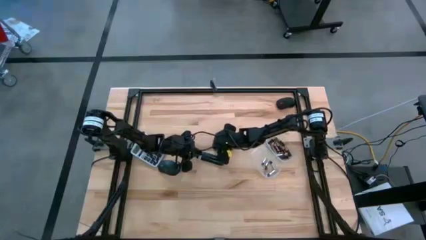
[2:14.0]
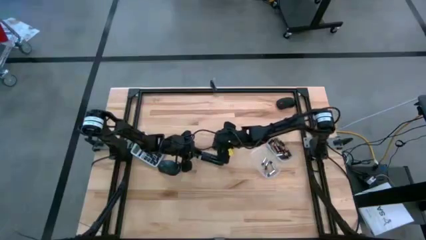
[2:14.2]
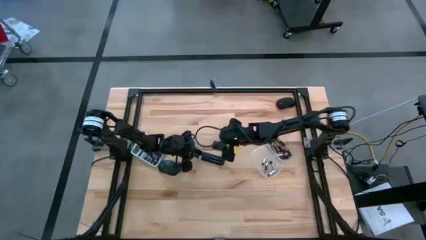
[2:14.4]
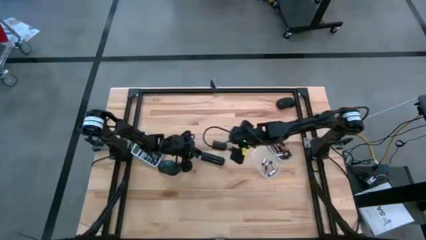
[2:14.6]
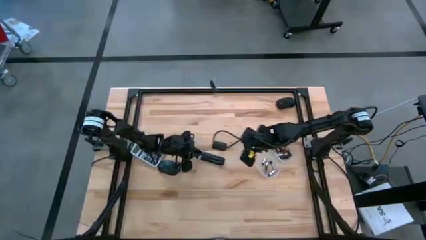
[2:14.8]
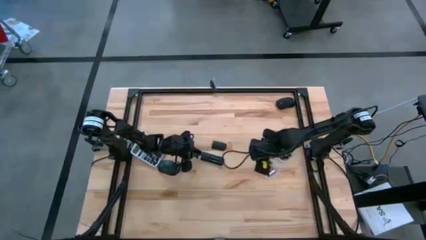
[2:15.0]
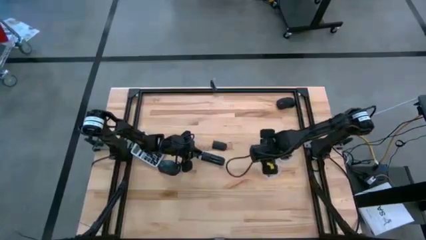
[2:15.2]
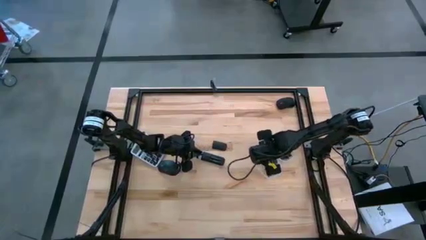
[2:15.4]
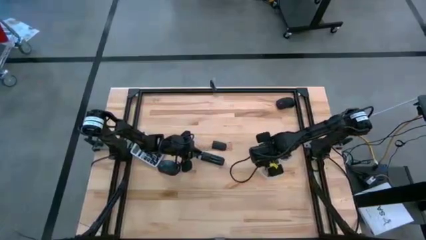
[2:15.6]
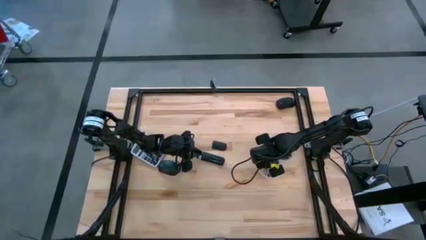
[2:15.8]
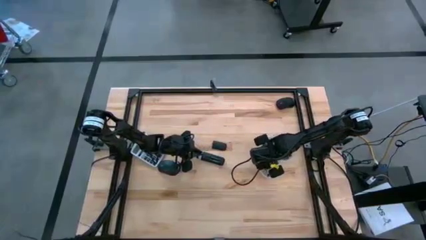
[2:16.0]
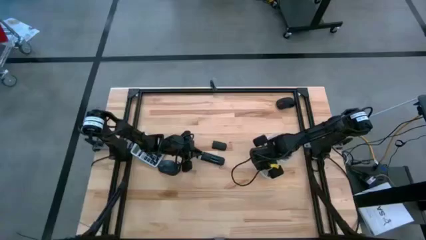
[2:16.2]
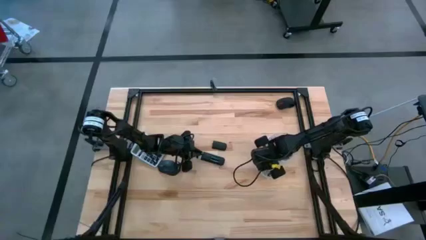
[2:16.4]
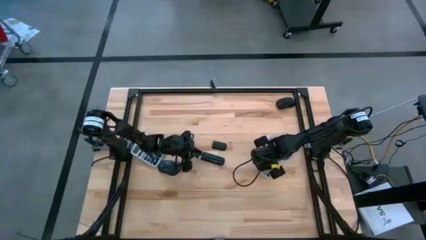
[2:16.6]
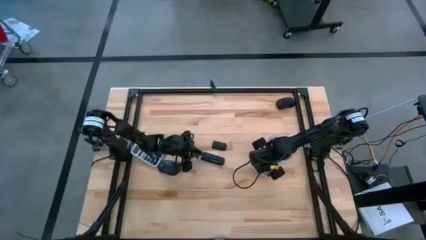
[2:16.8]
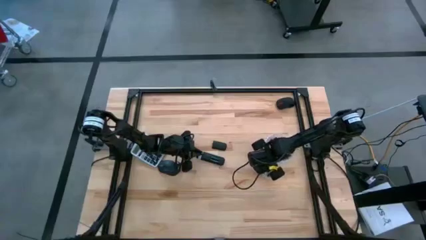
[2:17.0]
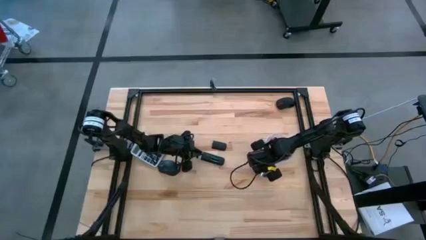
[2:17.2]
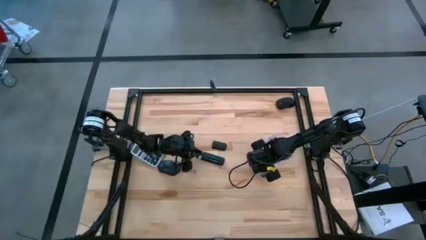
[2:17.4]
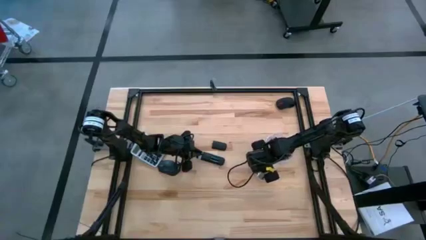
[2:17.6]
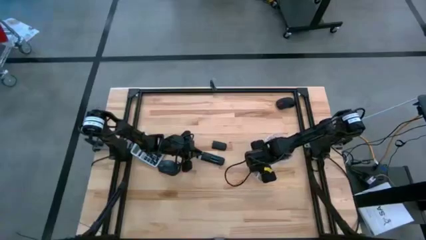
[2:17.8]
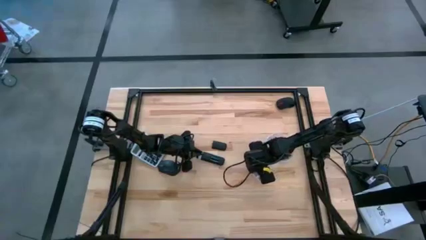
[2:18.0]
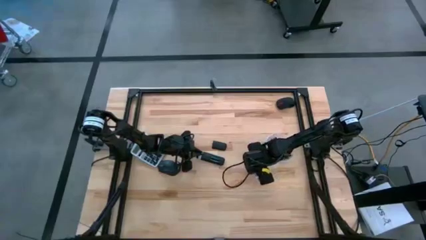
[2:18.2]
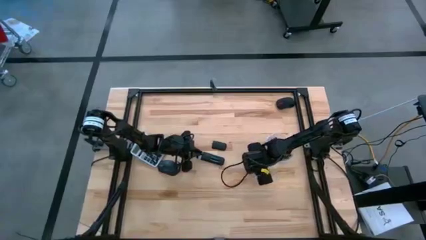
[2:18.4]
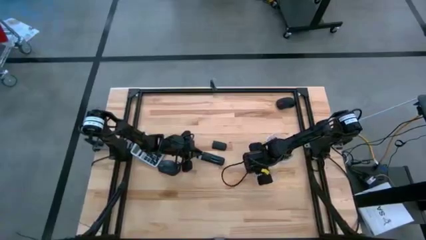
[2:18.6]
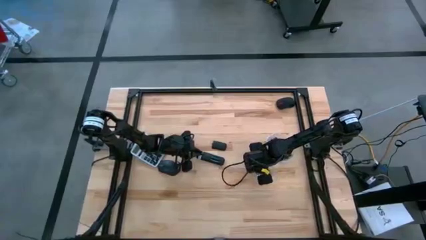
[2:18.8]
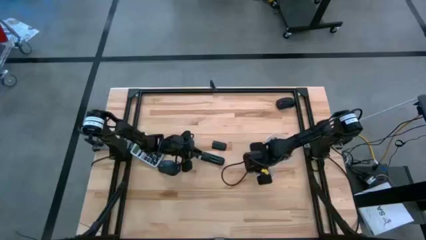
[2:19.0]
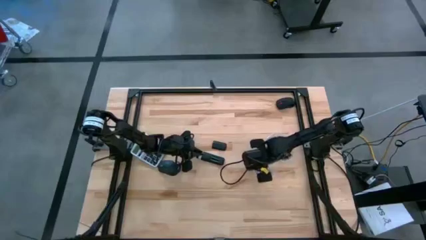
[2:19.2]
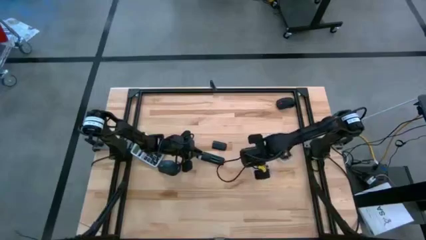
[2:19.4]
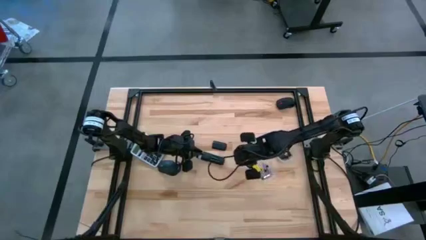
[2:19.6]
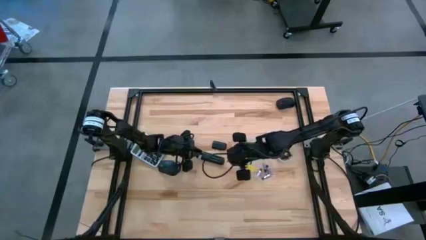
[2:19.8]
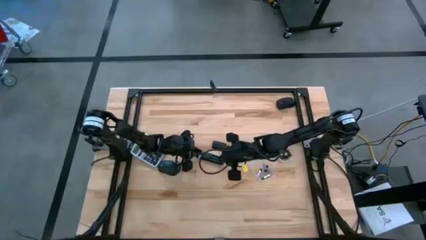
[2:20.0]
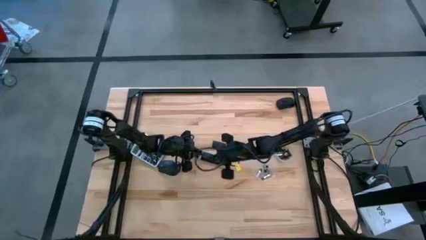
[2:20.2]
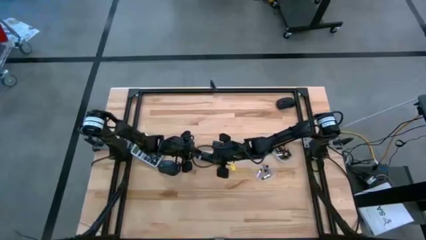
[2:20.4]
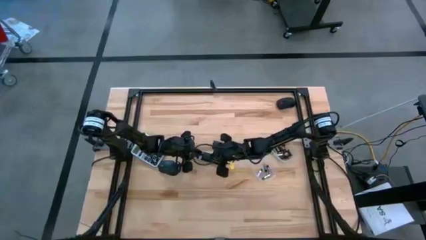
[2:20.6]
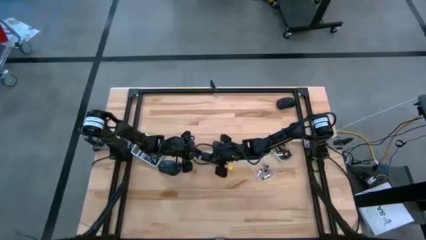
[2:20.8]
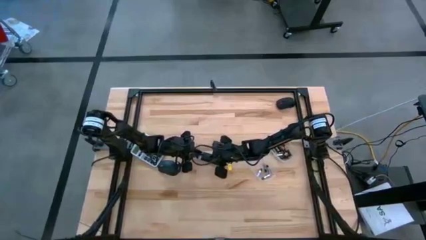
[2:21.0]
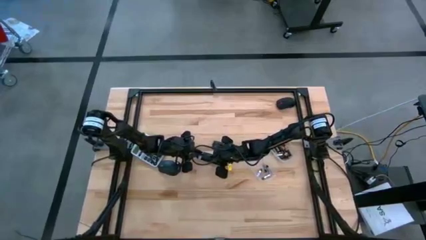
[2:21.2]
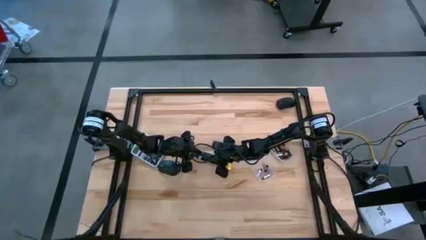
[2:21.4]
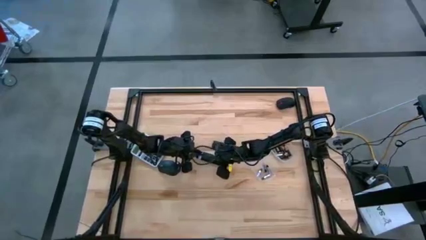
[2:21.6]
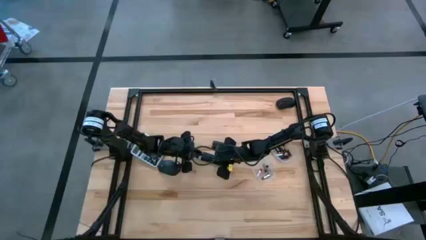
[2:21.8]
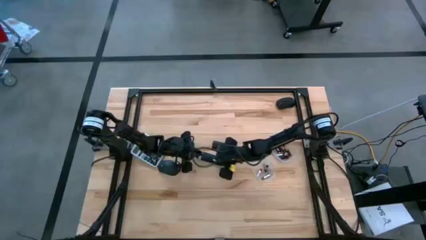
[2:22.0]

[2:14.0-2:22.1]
Task: Insert battery
Insert the silver battery into the remote battery compartment

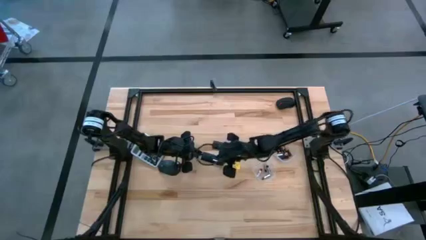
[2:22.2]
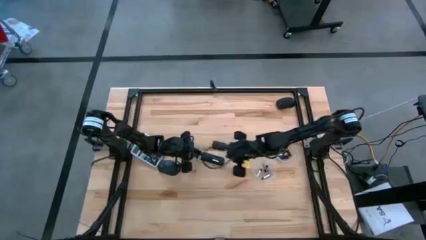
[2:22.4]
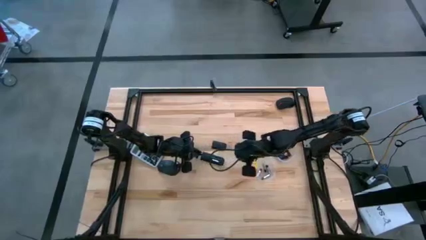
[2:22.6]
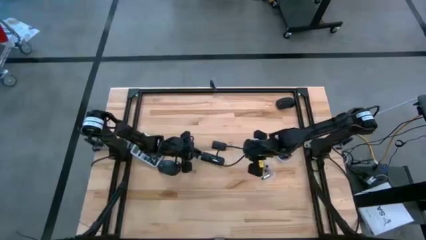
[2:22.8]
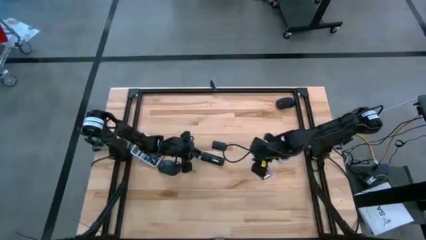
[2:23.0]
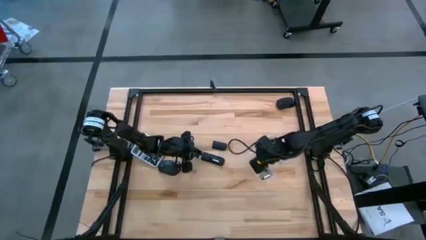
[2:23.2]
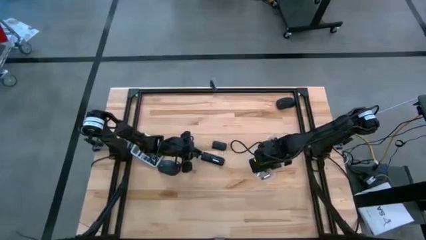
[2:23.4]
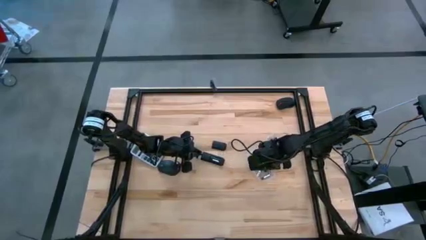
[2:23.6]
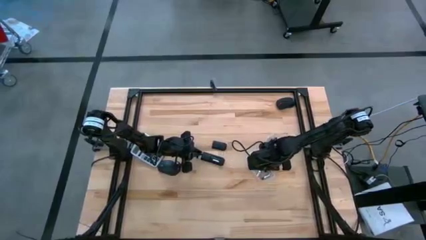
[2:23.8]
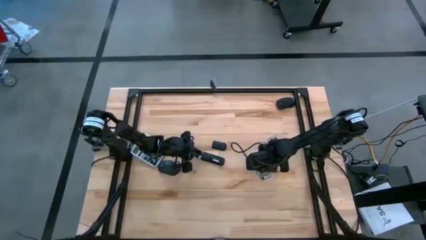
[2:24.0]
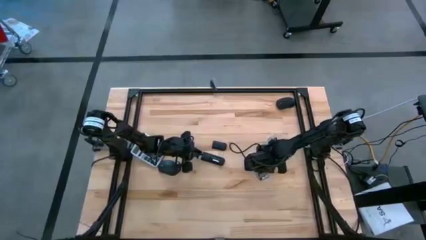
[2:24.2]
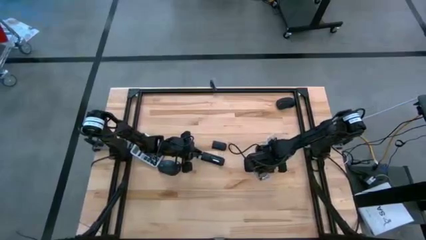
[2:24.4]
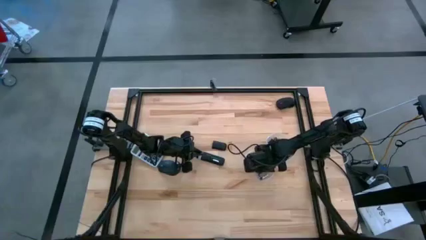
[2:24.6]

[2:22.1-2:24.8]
Insert the silver battery into the remote battery compartment

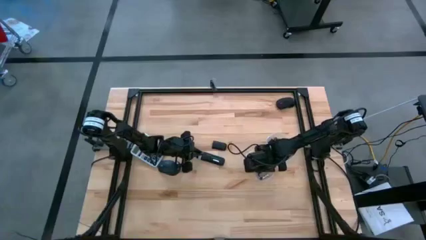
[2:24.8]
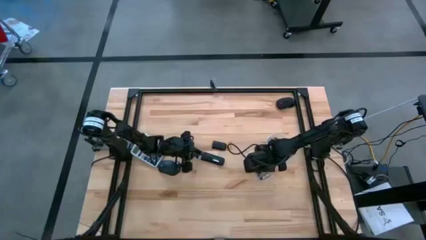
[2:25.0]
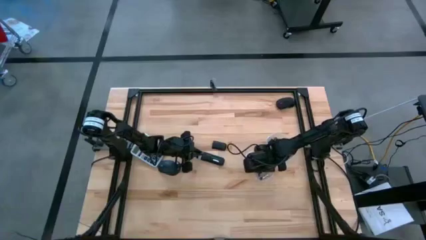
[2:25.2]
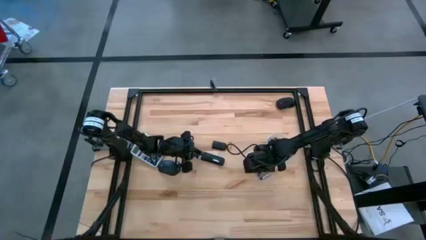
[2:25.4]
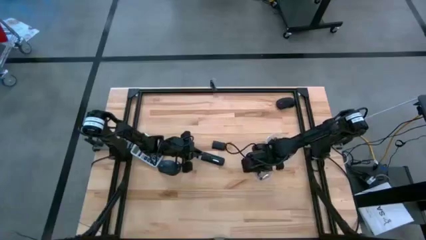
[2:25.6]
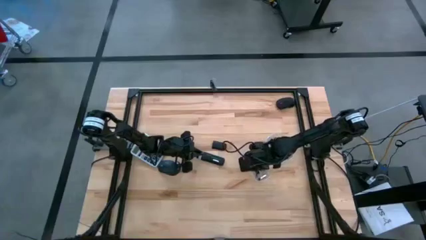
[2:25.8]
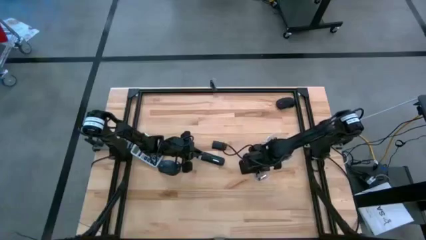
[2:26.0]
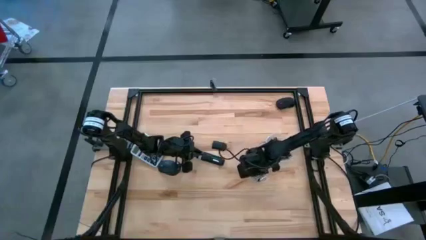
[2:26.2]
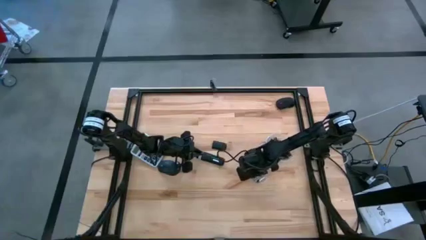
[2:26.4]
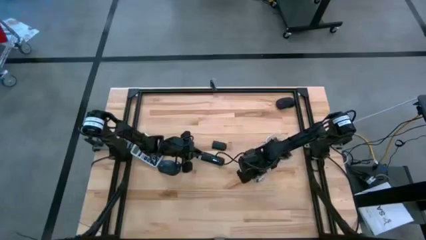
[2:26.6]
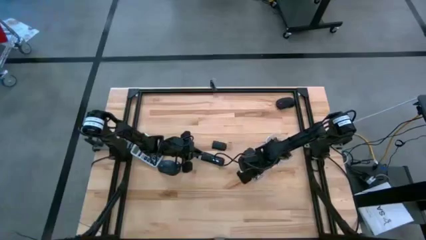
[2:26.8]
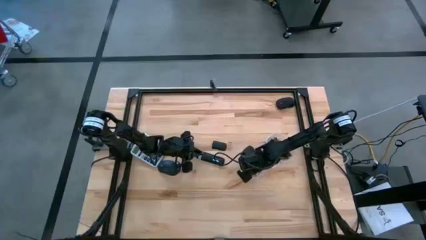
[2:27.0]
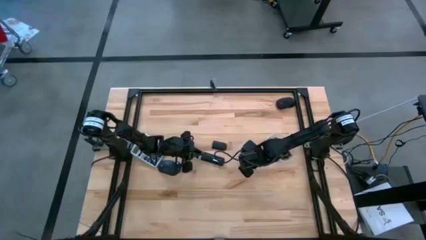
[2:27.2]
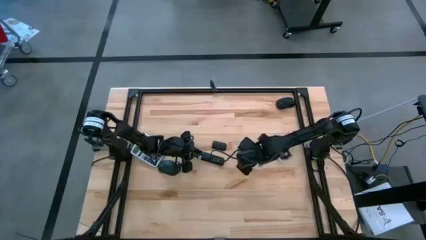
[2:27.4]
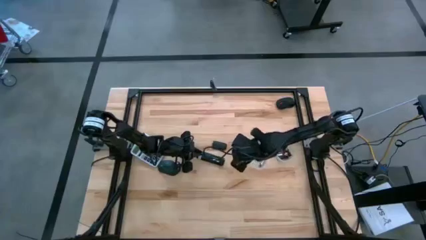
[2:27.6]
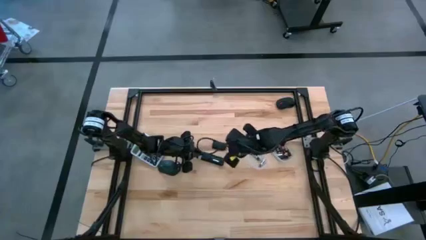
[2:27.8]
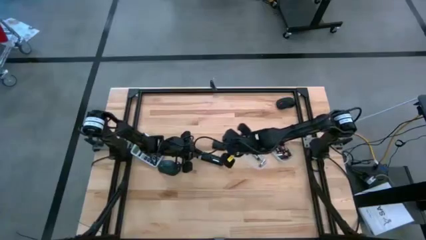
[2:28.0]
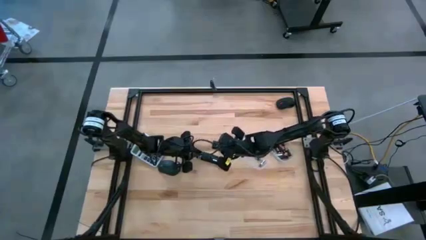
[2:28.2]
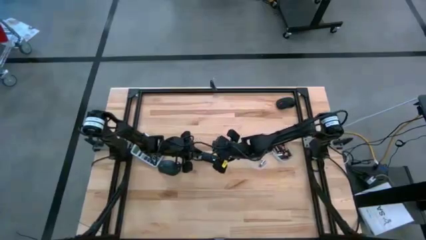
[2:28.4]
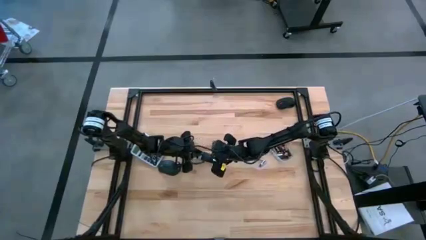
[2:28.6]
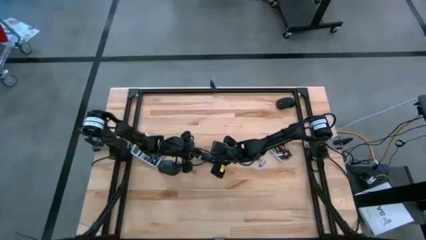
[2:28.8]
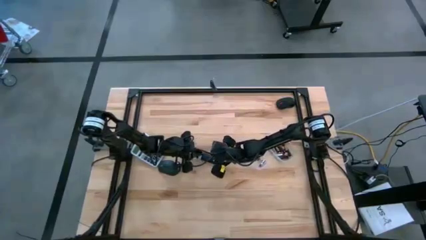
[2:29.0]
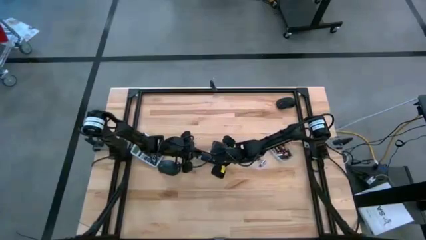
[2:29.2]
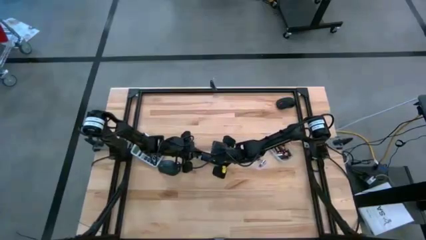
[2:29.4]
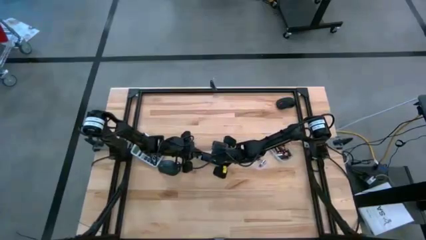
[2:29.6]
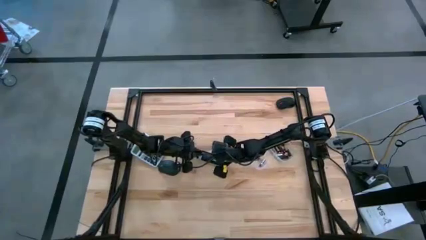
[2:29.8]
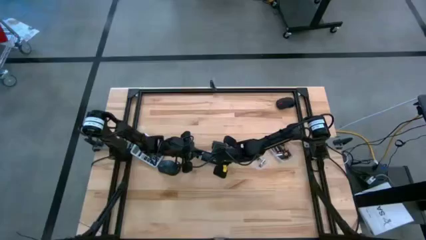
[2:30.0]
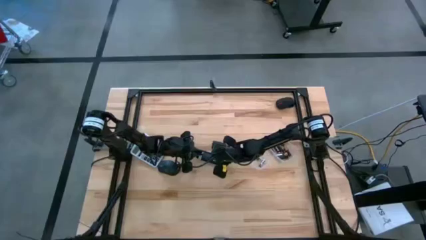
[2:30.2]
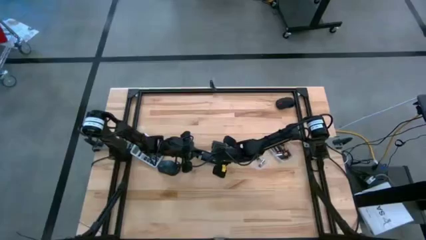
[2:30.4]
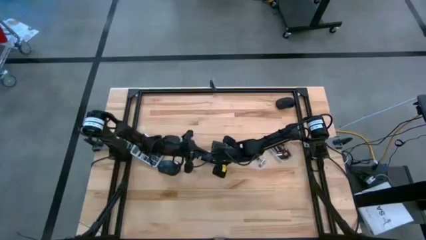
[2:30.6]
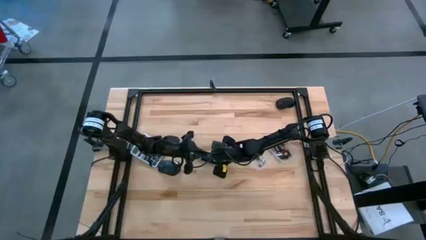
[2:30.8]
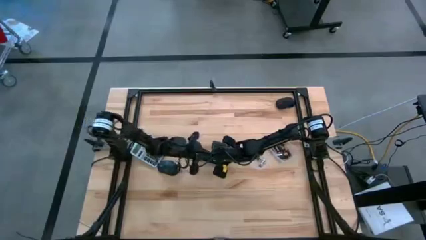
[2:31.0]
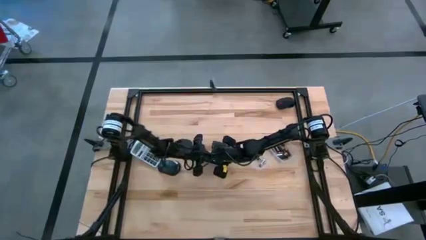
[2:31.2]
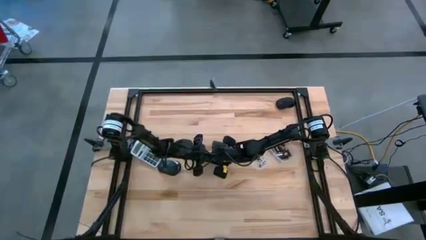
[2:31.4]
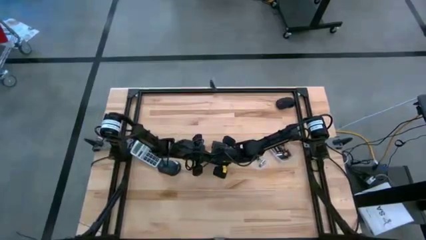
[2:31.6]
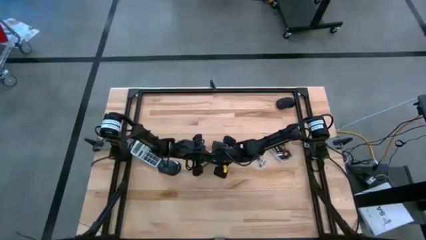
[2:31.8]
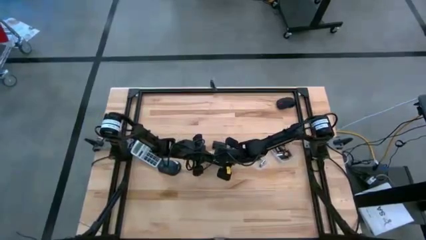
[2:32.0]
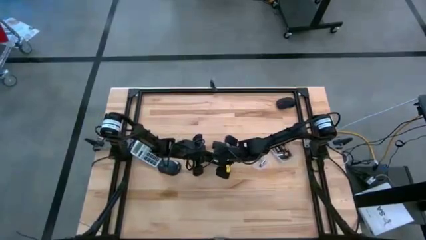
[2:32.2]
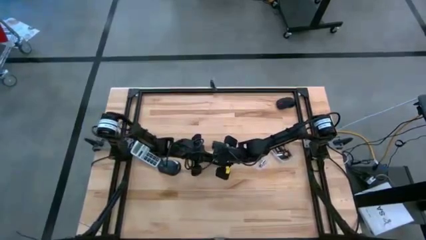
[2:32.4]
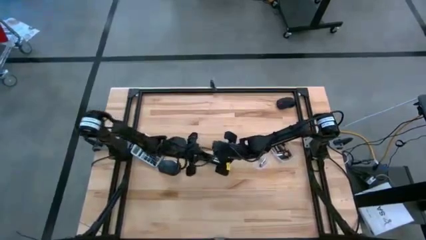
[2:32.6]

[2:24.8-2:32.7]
Insert the silver battery into the remote battery compartment
